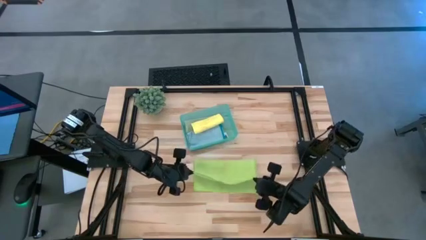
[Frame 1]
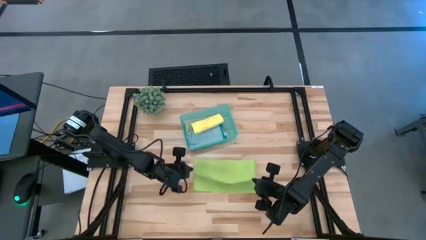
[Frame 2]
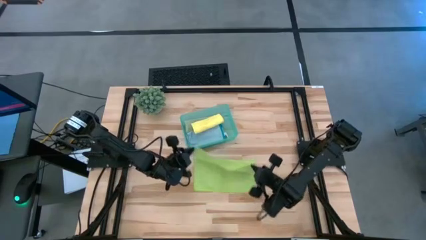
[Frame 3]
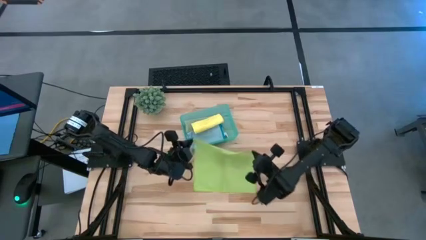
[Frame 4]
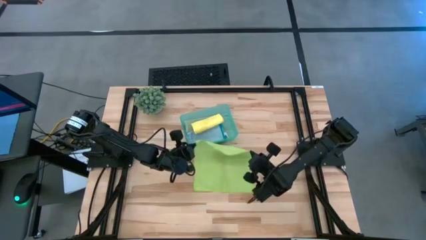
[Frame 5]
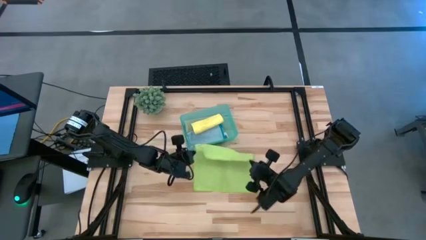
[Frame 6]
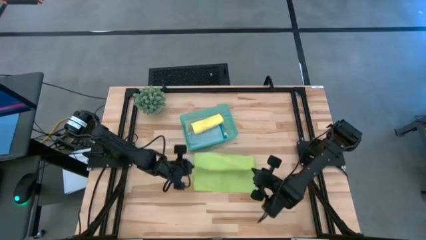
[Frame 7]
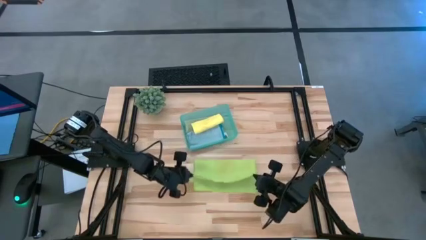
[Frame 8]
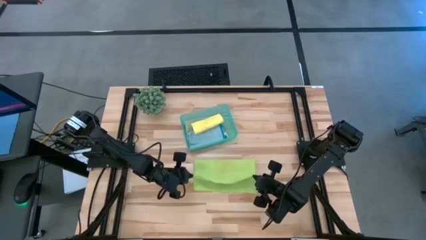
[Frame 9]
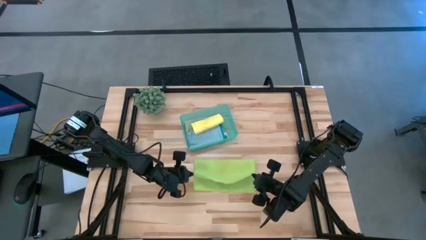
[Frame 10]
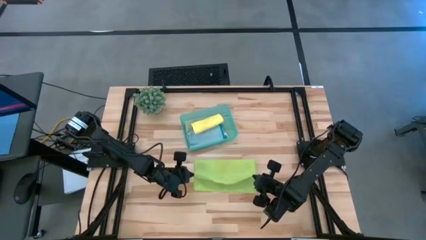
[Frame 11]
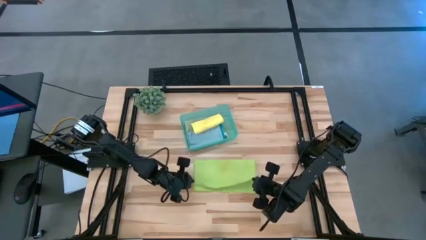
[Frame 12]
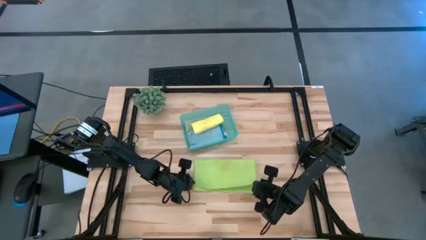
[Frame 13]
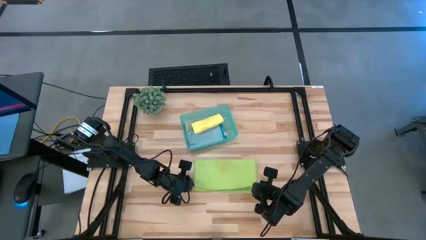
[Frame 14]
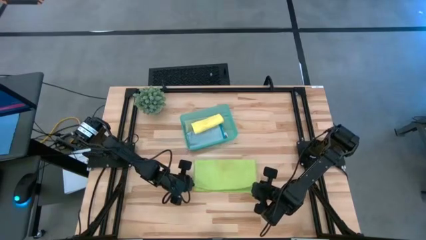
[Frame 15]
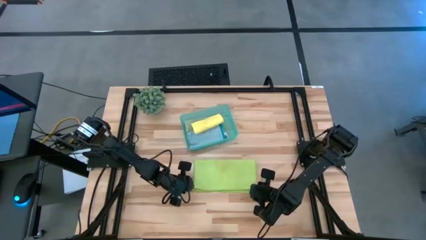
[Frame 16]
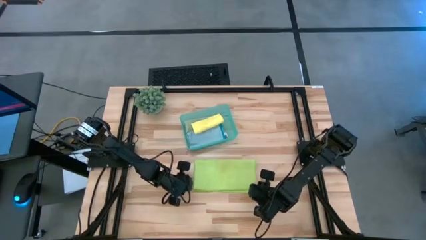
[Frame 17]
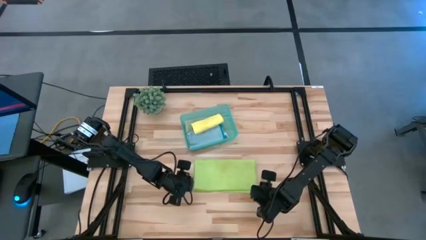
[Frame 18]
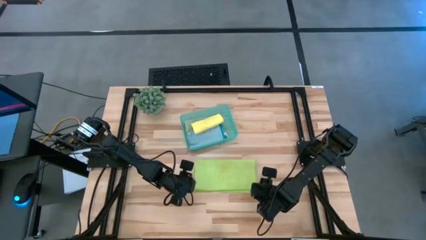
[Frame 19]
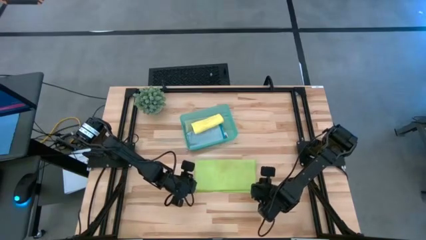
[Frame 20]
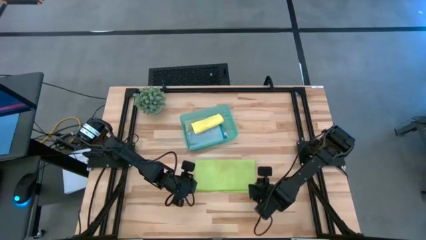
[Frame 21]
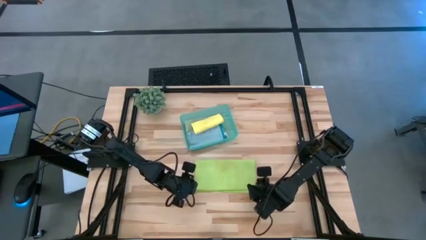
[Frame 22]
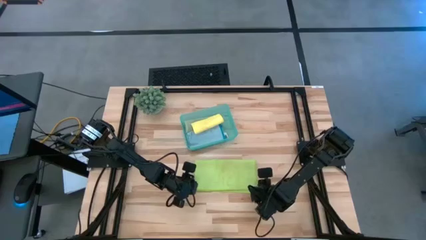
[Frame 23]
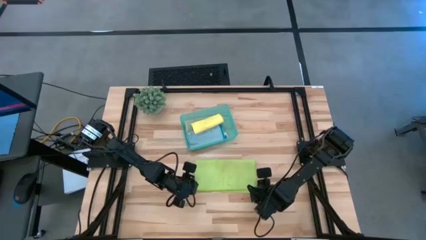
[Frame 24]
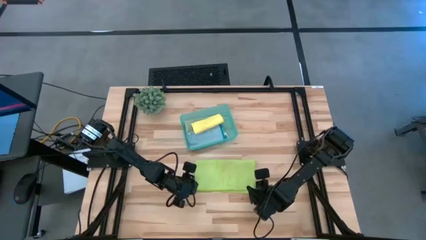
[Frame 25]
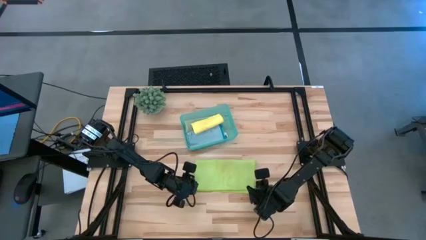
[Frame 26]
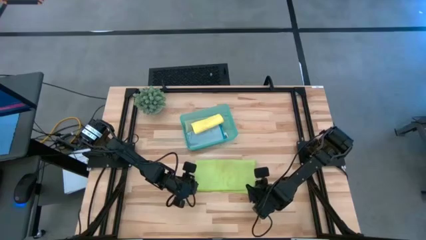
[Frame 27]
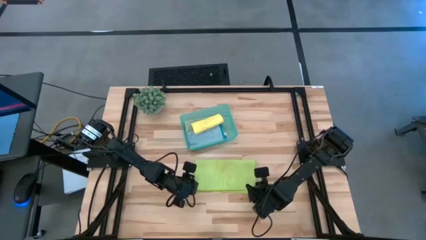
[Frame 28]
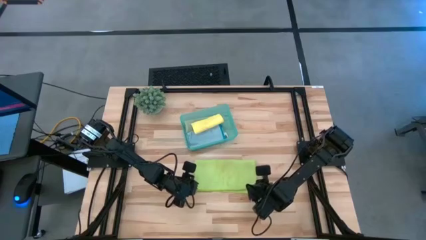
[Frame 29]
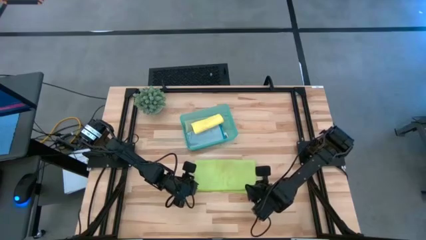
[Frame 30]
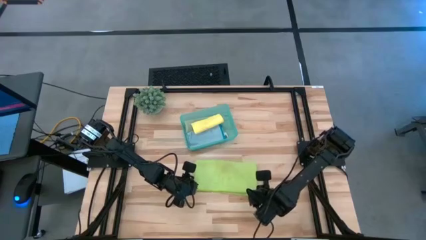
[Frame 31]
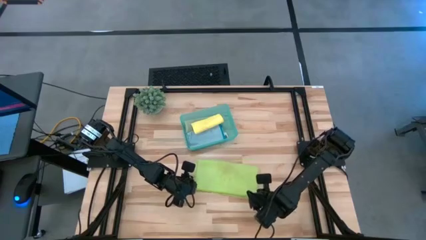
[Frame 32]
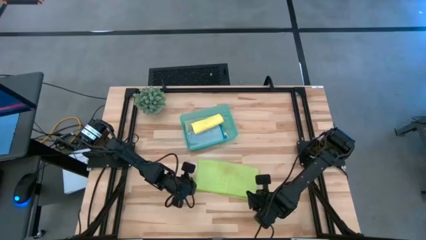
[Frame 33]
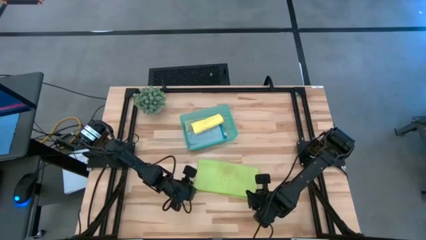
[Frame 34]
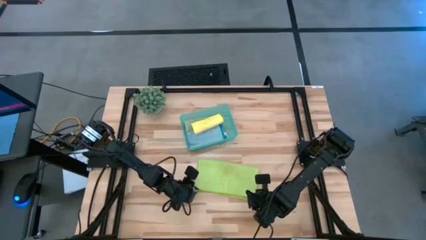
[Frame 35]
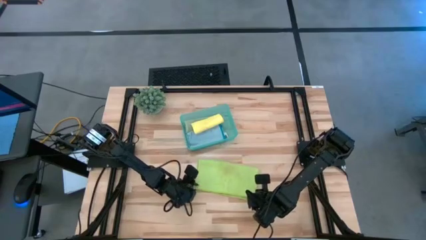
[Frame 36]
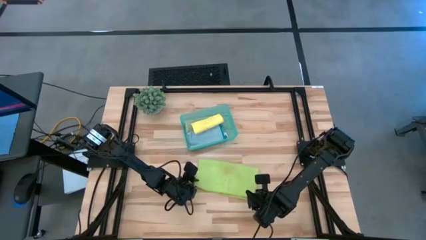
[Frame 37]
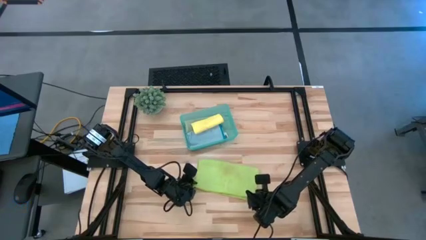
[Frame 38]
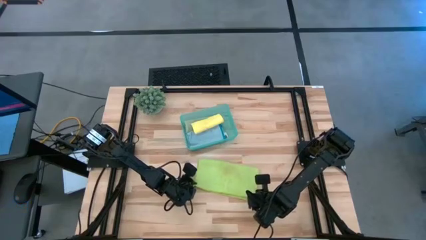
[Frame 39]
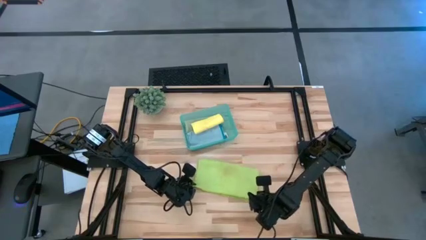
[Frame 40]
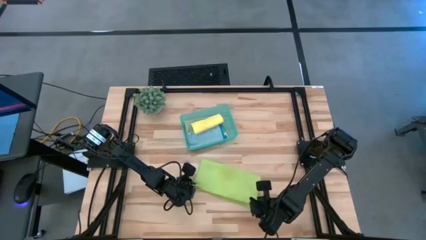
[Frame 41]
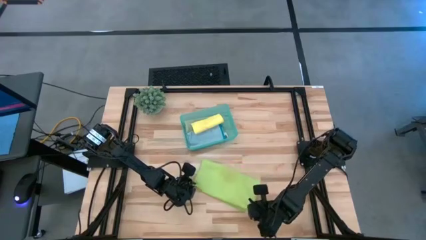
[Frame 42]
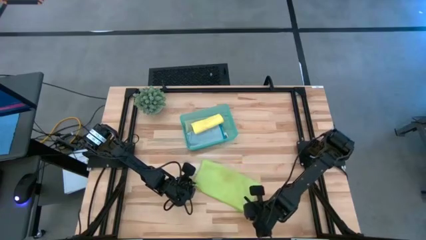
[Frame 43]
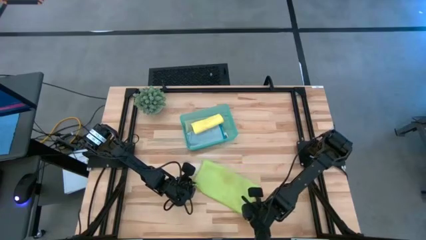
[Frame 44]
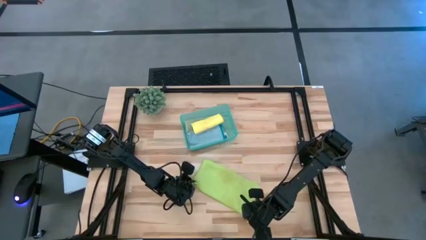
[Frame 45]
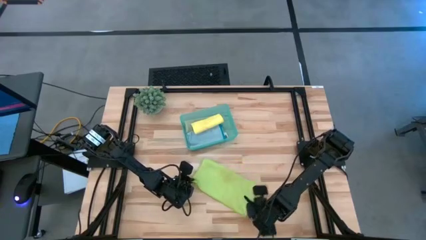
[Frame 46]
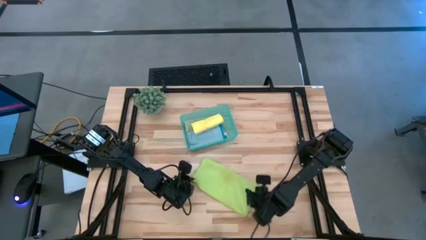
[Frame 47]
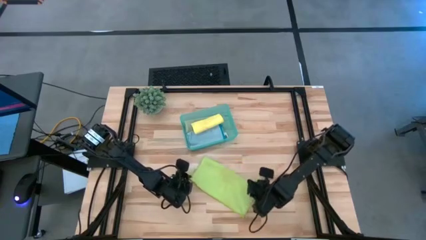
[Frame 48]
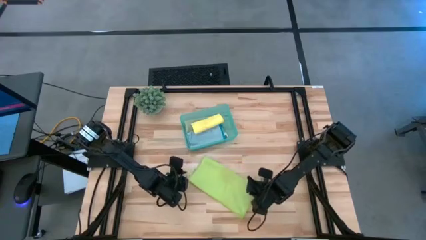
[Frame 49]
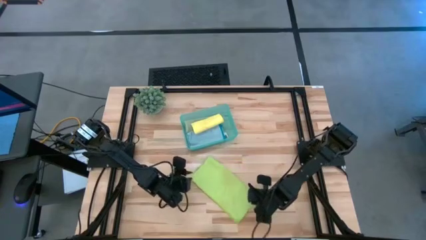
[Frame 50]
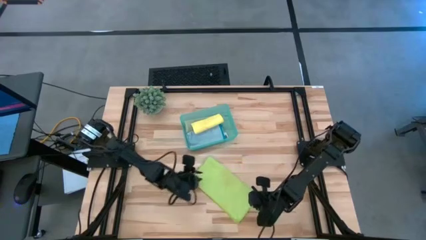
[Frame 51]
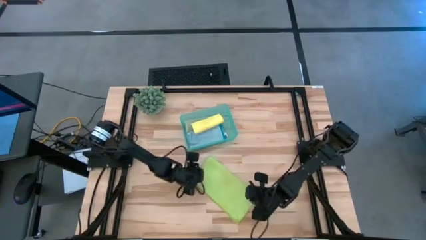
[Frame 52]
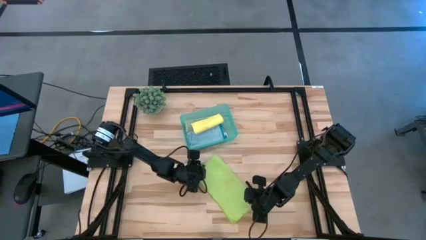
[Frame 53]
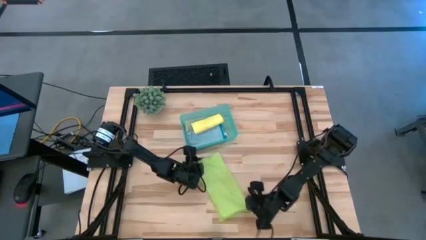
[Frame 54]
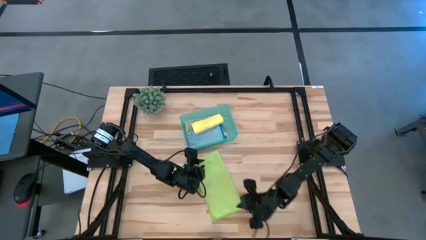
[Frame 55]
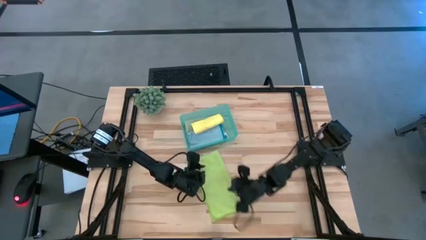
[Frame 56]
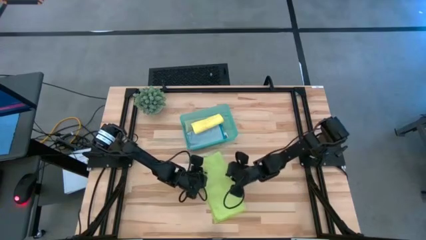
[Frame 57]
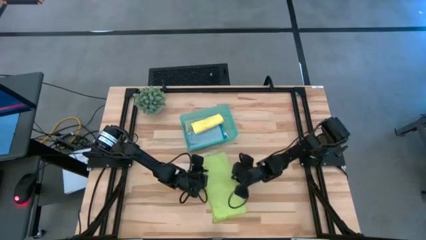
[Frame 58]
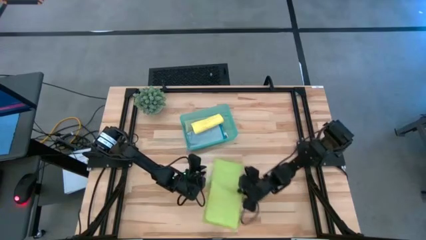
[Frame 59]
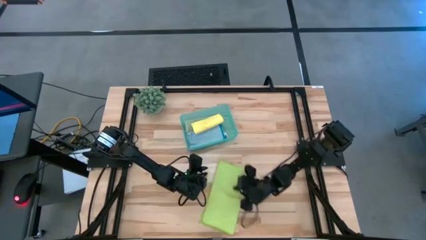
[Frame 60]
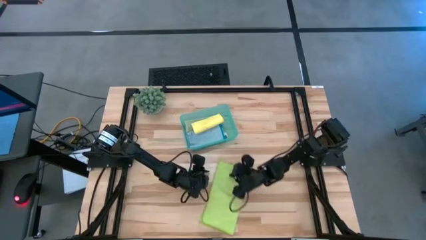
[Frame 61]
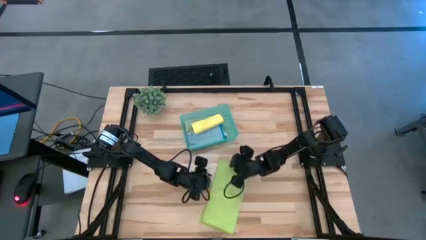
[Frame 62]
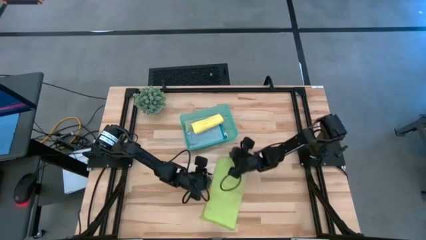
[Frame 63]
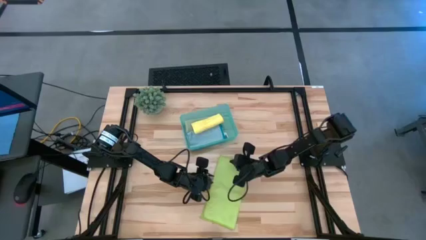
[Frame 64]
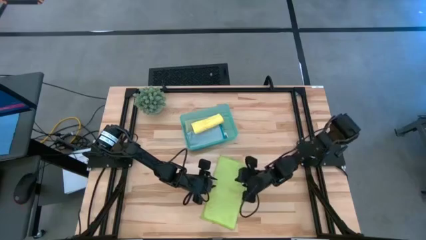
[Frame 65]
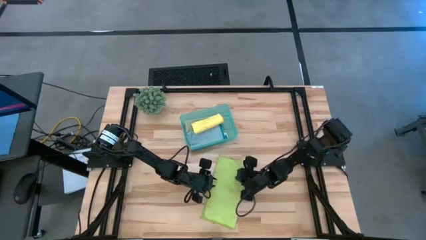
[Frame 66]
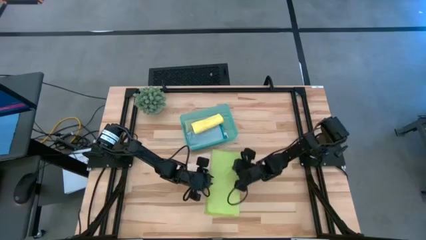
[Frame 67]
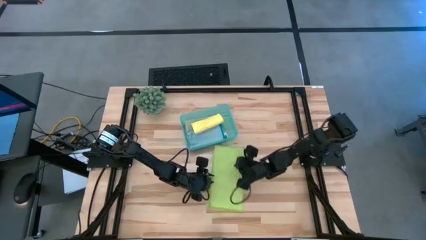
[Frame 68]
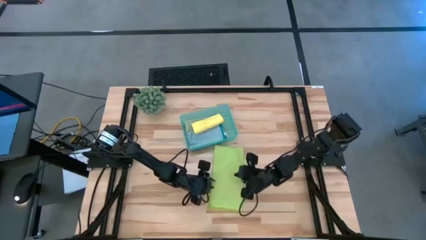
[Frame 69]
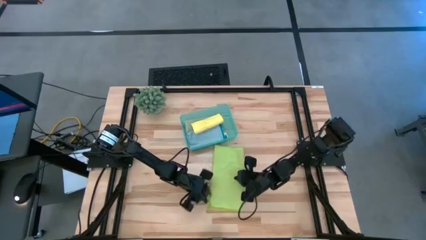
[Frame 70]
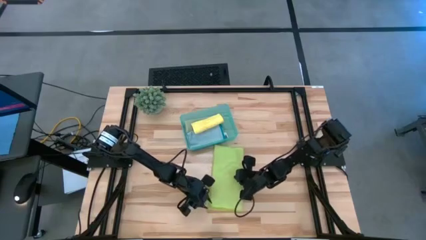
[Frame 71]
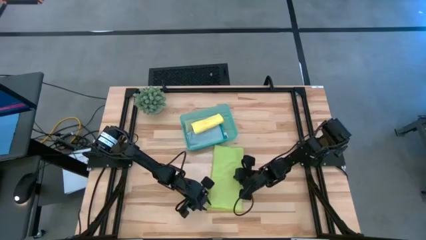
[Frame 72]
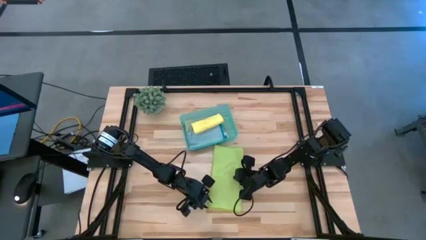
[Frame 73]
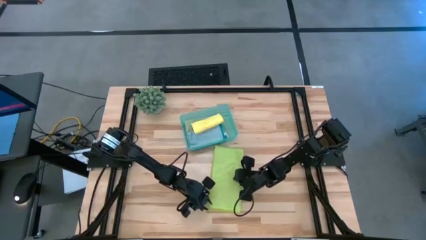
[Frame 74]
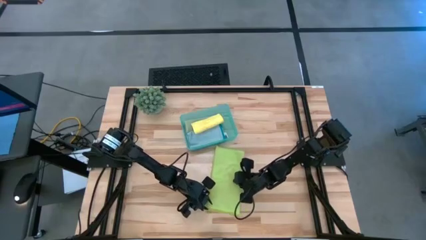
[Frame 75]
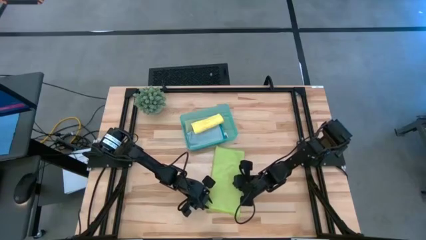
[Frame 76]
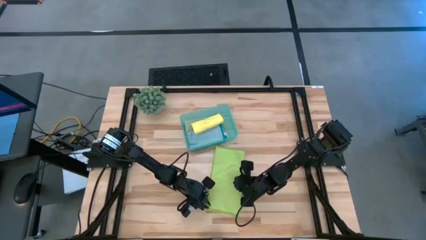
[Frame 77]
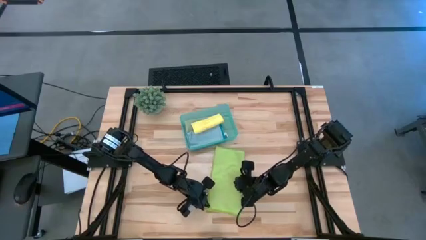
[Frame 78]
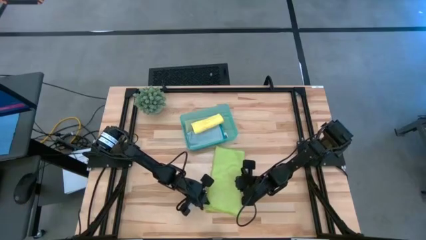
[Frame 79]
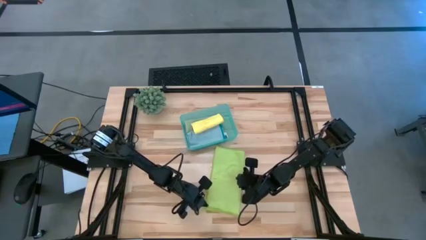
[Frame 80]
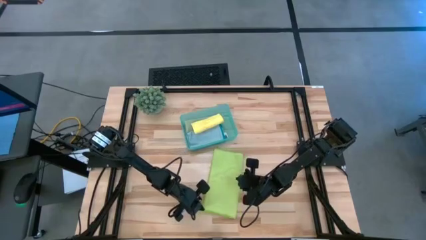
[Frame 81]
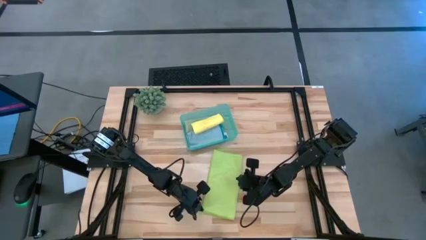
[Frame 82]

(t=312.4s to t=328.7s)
Task: Fold microfiber towels
Fold the light green towel
